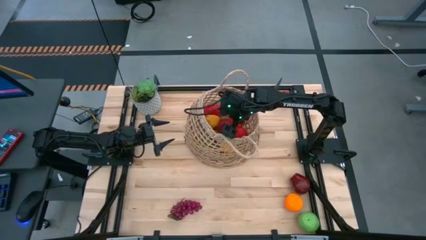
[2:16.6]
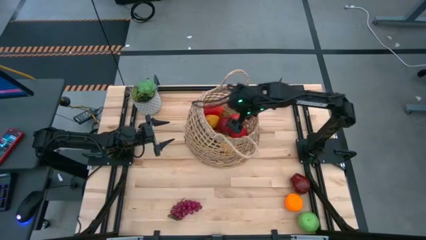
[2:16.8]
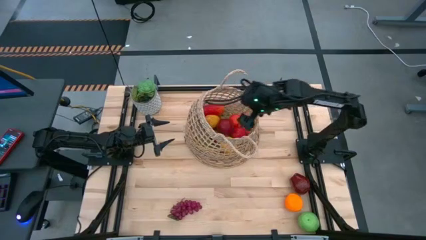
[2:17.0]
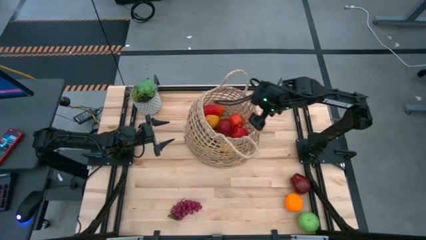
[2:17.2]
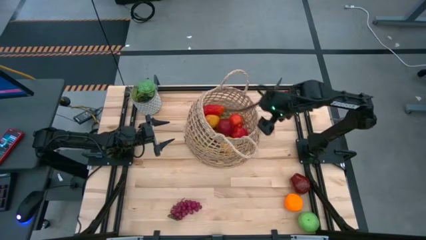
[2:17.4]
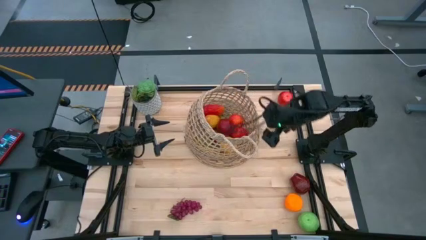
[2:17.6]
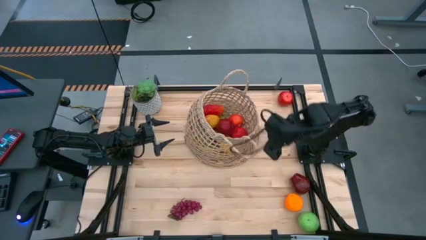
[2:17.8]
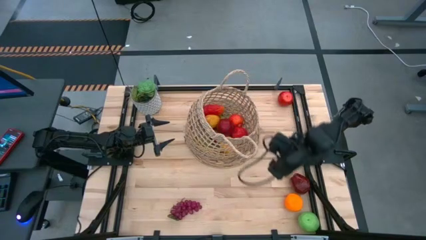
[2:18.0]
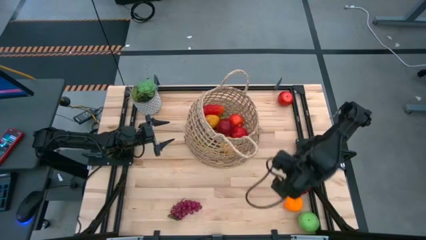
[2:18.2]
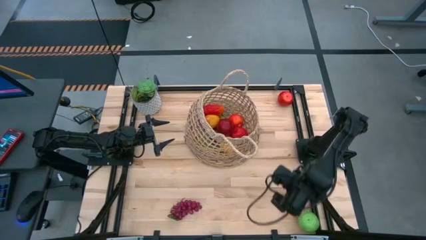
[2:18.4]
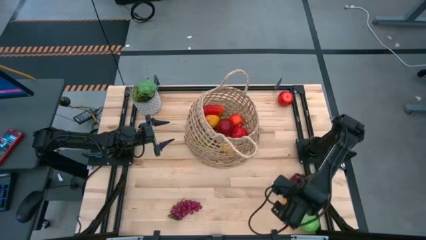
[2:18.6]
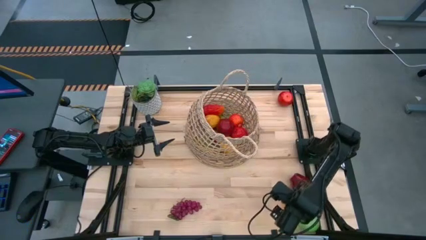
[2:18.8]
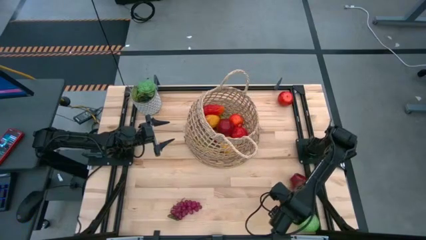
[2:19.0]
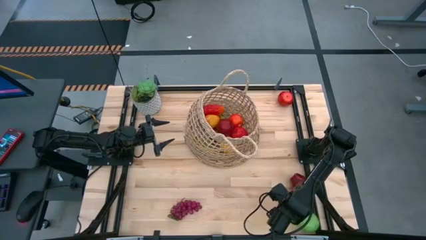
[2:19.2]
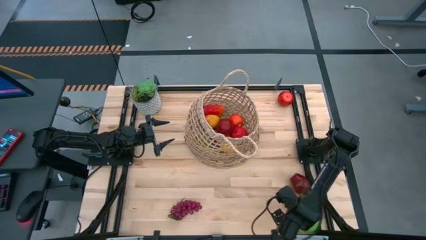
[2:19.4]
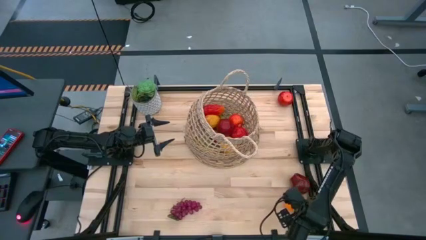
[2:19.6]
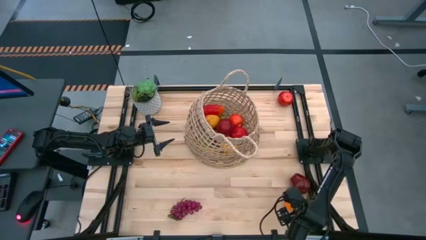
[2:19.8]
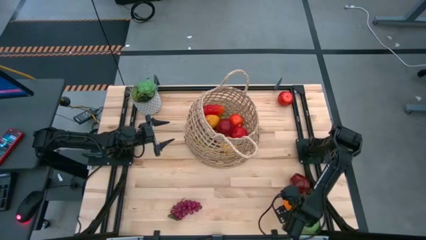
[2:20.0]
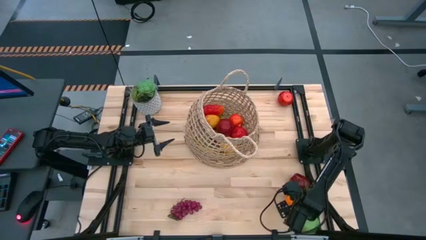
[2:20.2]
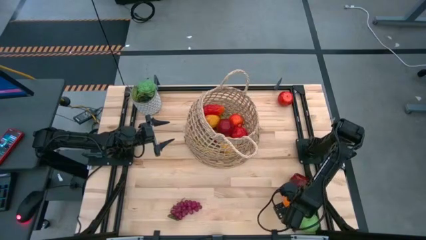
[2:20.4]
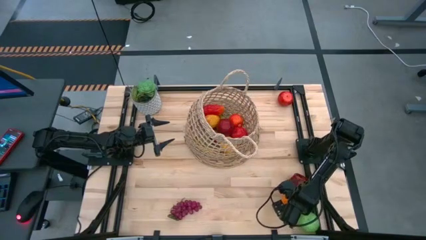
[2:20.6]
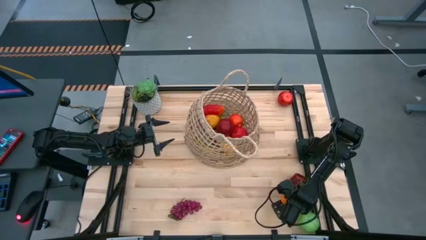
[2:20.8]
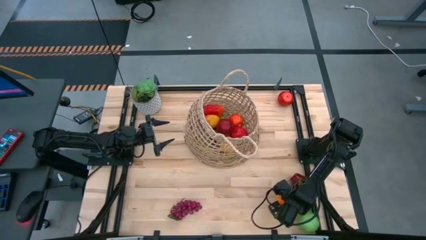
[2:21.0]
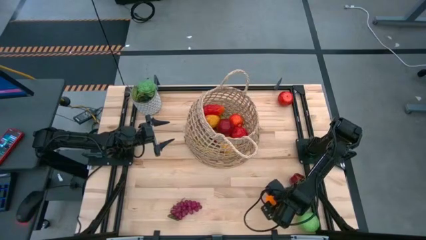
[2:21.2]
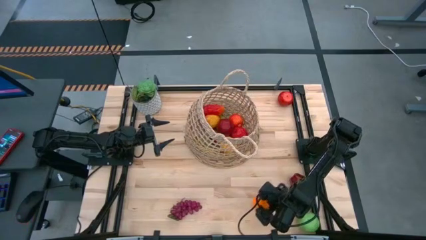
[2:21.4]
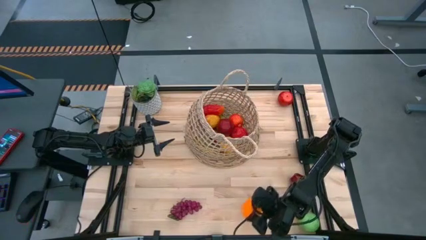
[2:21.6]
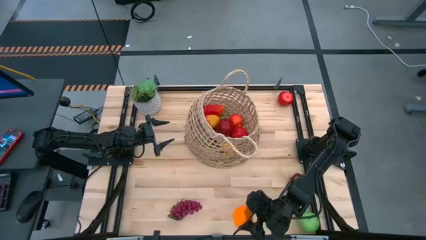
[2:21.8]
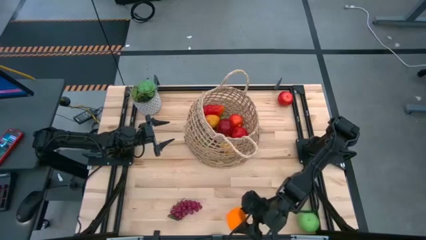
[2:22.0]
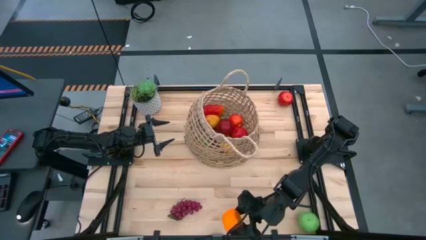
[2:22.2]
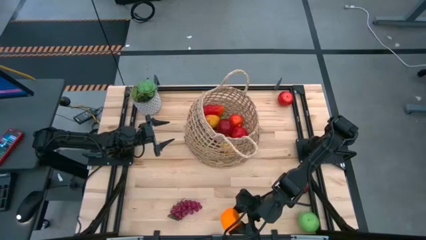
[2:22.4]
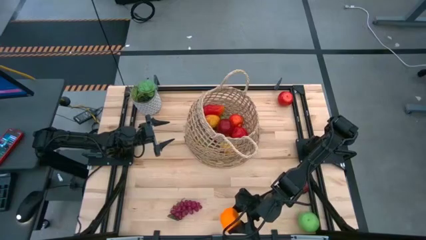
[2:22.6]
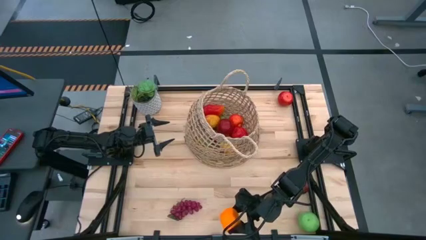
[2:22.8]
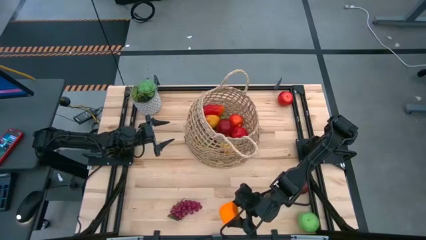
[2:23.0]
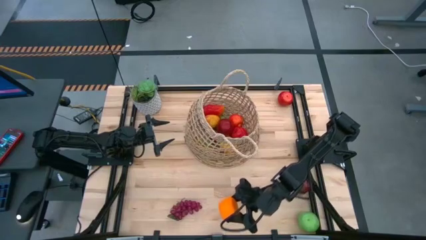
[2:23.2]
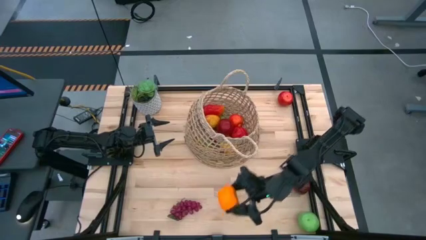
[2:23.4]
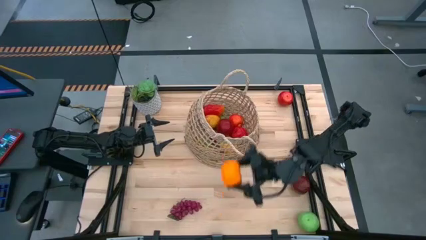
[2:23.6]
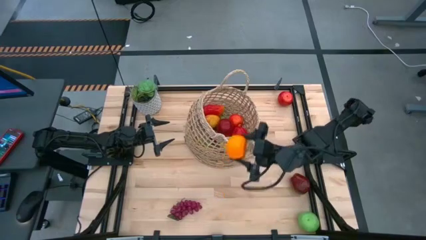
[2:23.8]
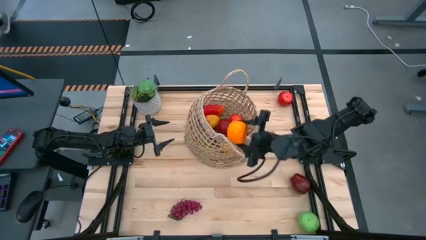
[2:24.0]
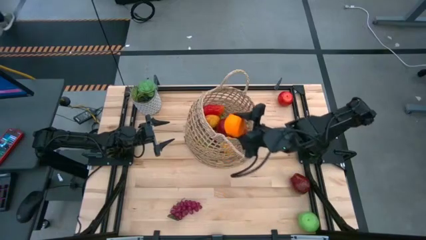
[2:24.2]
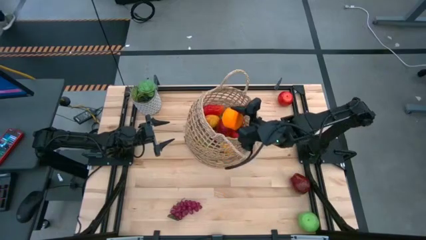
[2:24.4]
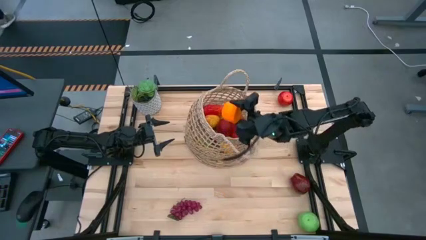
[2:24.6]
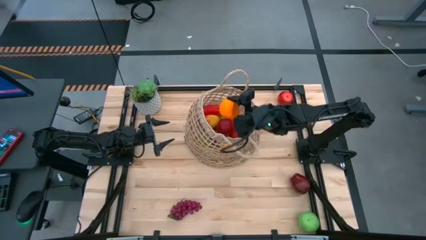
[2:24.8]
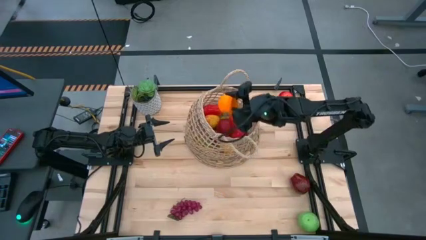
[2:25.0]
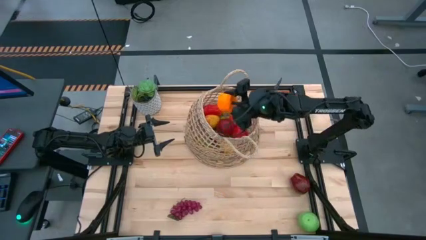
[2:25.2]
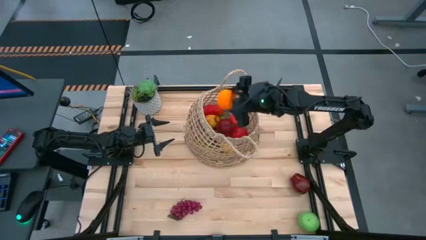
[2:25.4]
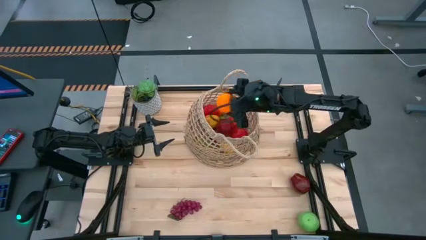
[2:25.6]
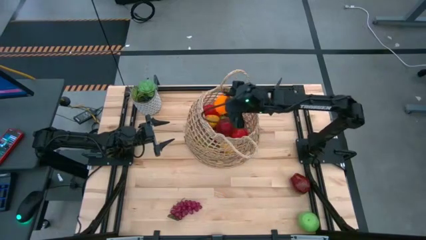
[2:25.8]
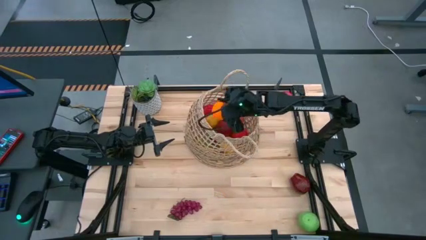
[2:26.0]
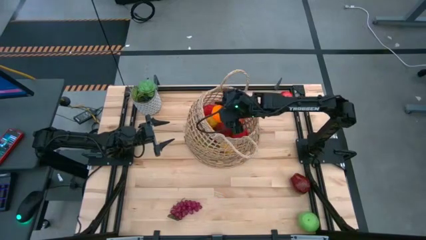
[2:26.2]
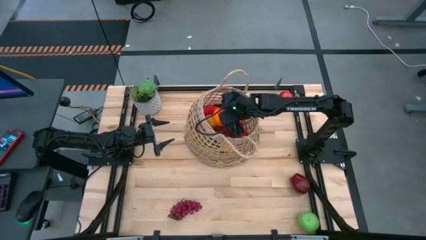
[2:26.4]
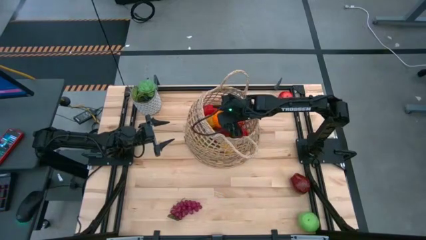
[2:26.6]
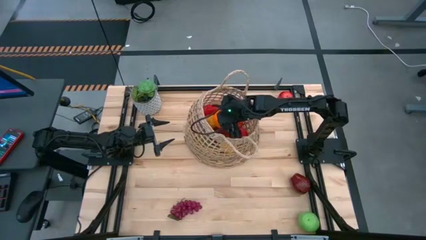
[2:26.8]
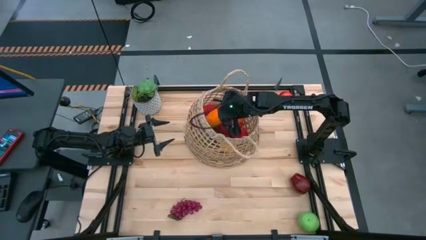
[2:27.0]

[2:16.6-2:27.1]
Task: Build produce basket
Put the orange into the brown basket
